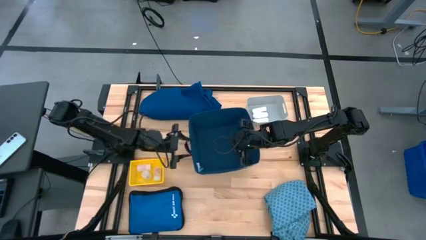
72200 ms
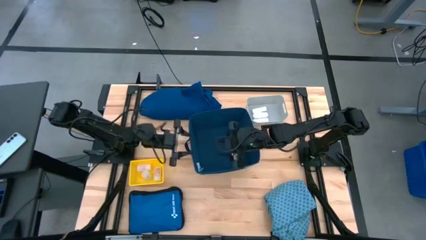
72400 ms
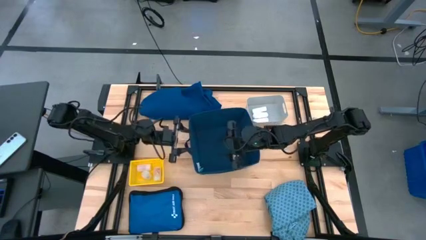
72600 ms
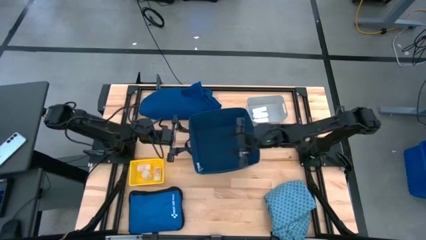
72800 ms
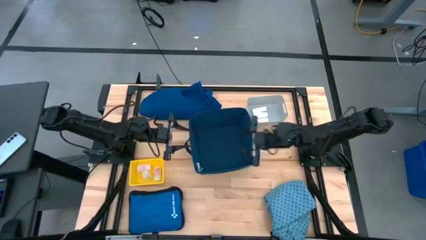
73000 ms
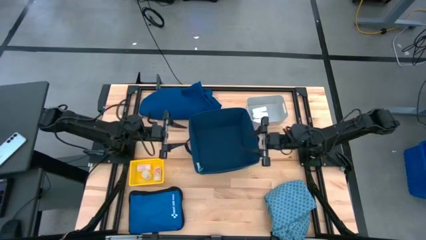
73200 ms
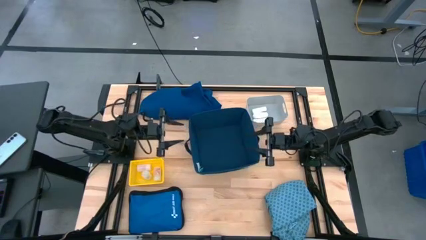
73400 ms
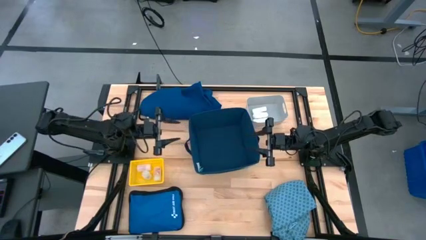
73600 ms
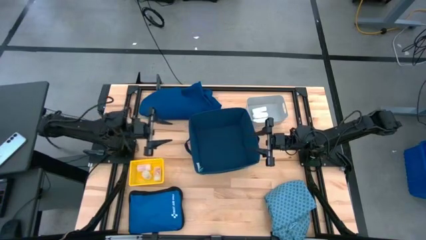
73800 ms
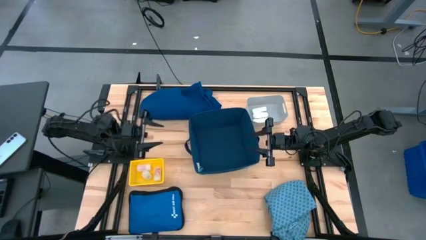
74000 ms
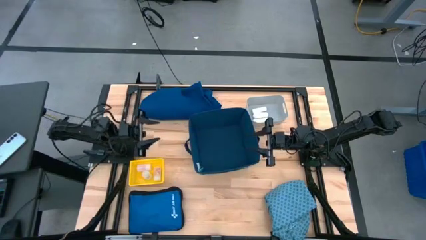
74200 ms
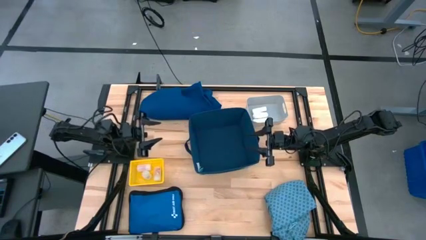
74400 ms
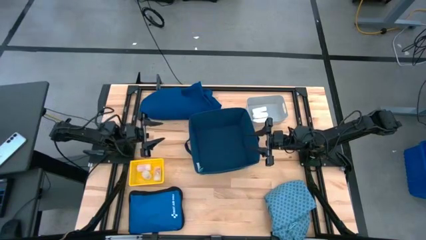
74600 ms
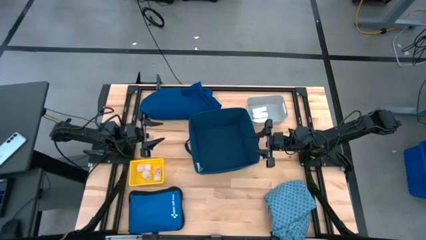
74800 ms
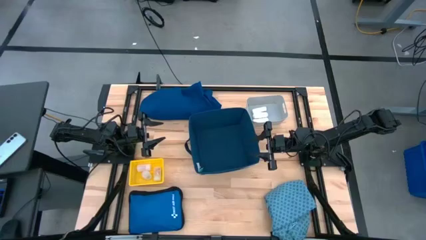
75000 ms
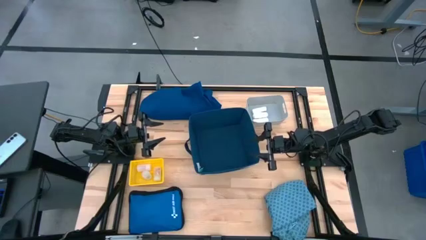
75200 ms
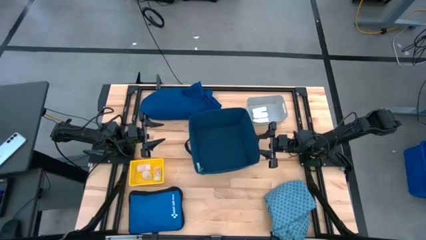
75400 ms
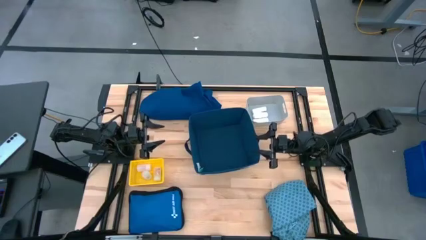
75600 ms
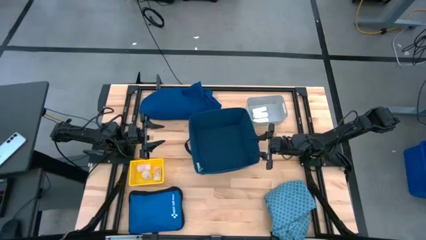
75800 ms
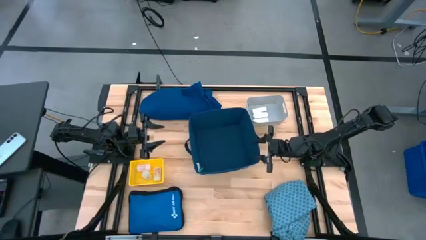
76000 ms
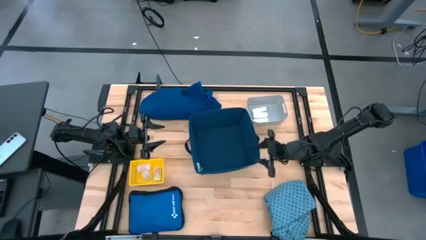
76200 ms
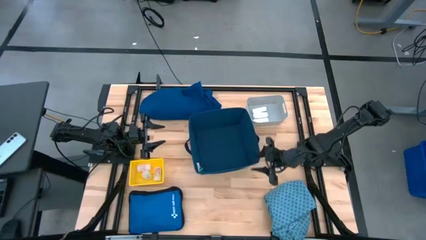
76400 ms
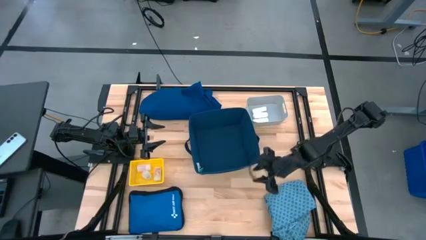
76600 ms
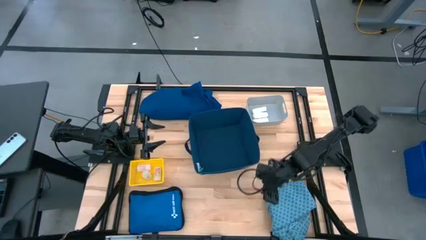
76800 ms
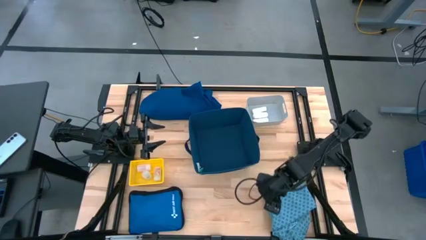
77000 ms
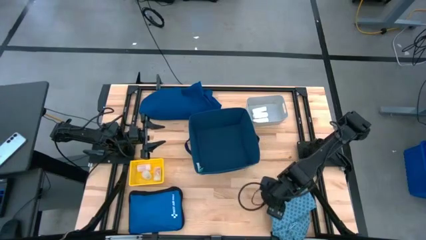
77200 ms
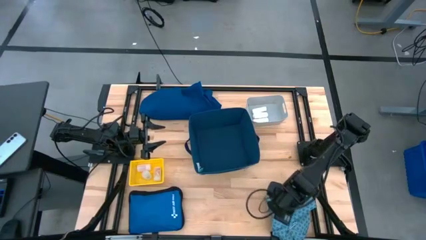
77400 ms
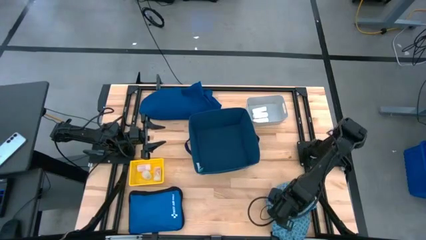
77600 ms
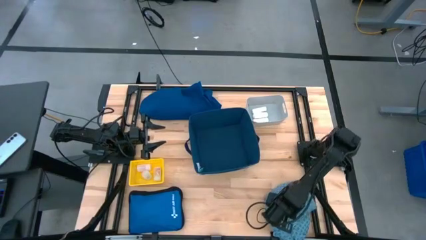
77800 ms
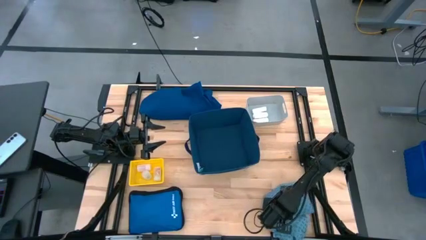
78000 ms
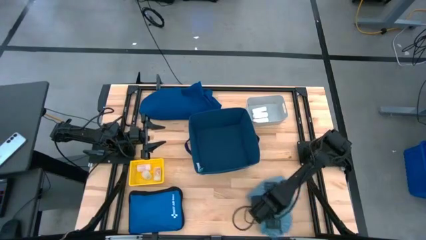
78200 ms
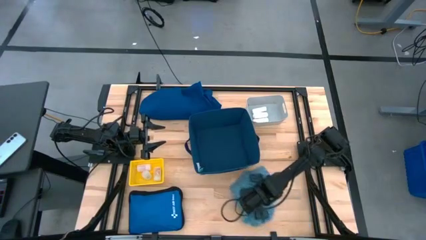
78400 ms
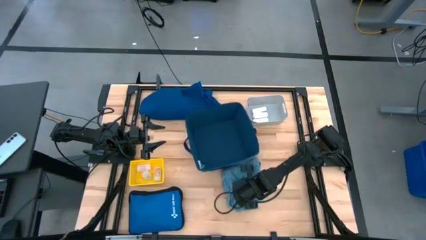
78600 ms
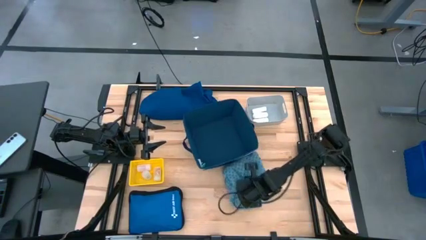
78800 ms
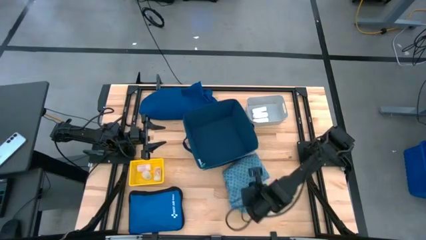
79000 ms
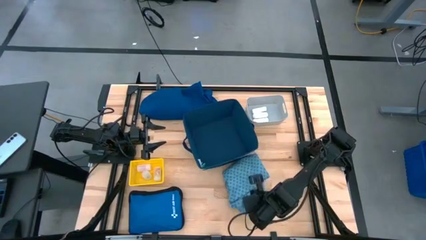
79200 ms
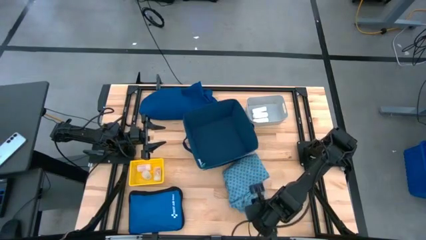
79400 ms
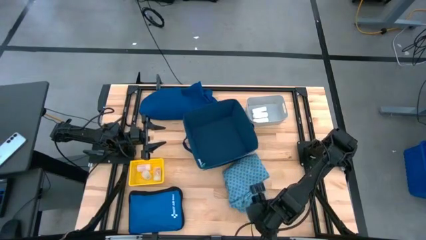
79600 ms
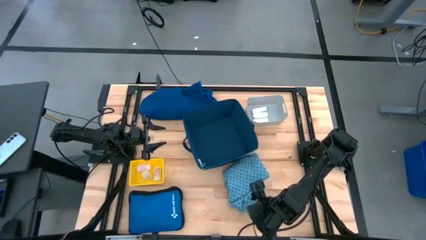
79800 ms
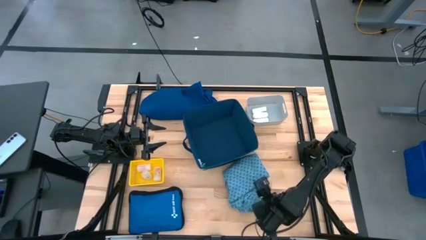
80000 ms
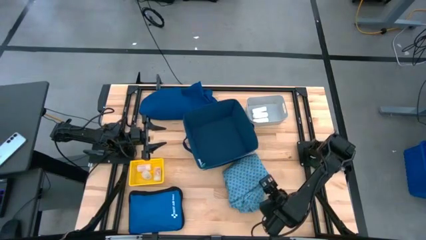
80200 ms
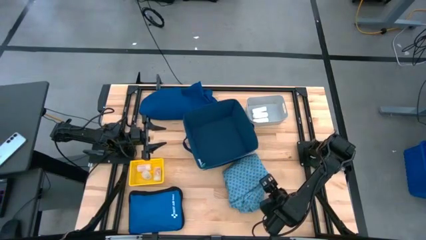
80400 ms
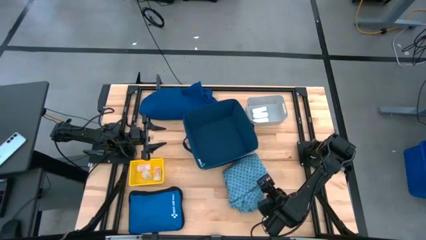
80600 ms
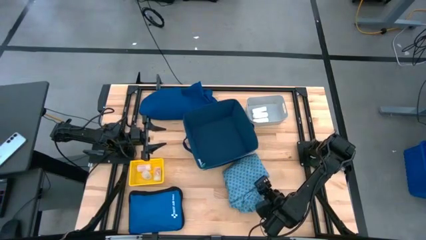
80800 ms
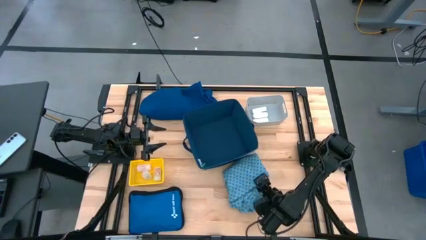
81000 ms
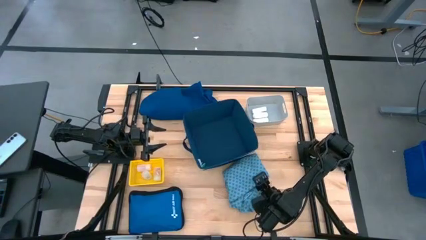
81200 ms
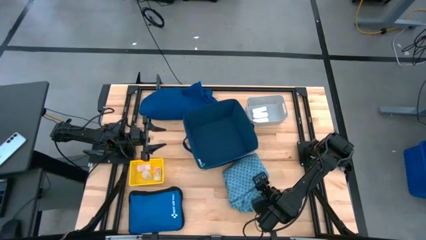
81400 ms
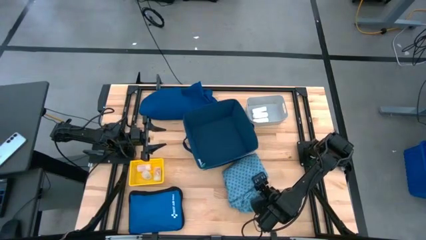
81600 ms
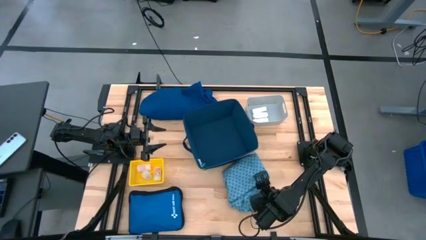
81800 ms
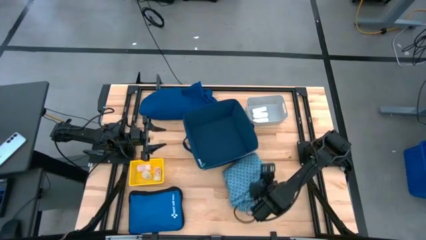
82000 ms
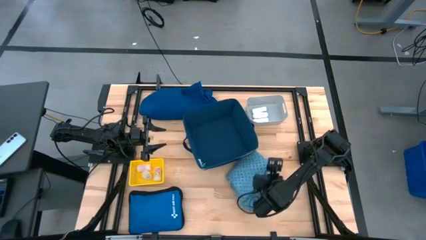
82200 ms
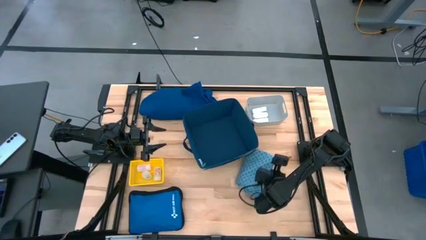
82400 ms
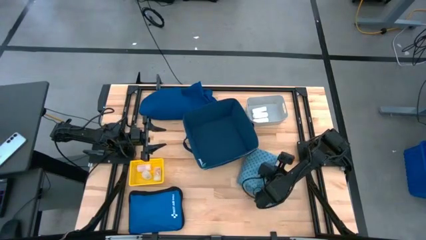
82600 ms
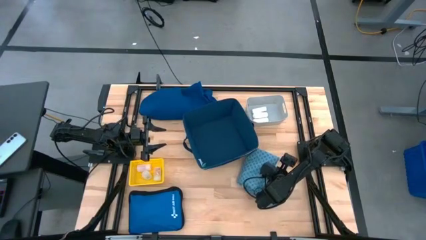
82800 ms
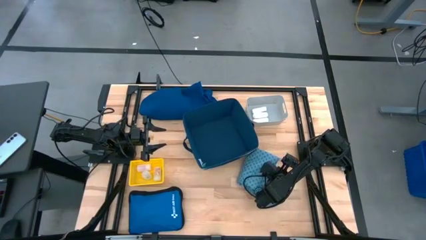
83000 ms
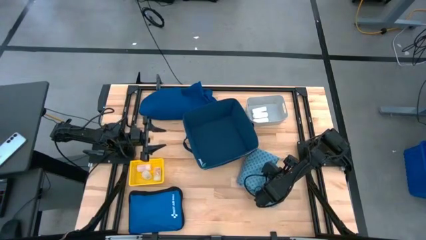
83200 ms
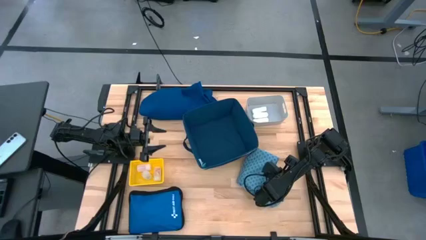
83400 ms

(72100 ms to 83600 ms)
Task: Pick & place medical supplies in basket/bin
Put the light blue patient gown into the blue bin

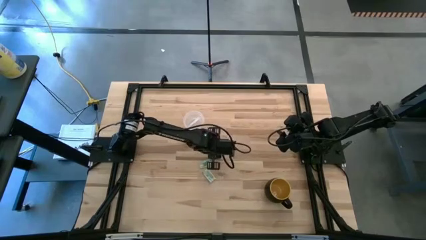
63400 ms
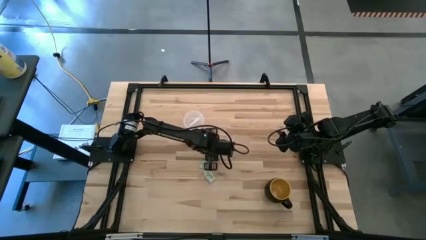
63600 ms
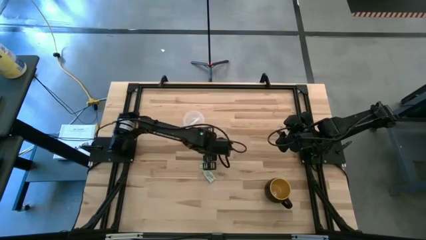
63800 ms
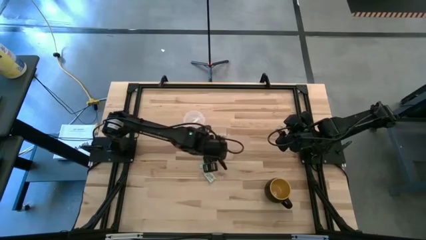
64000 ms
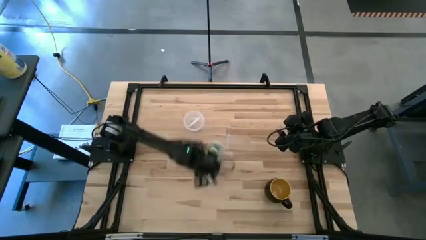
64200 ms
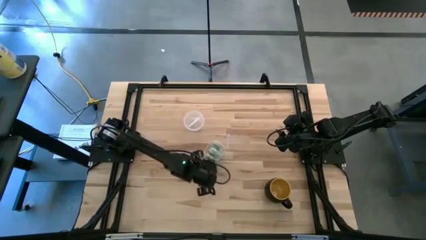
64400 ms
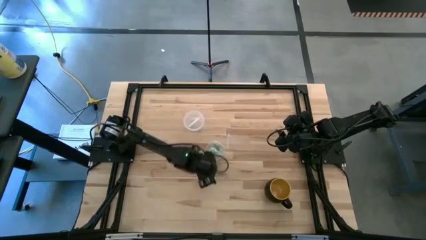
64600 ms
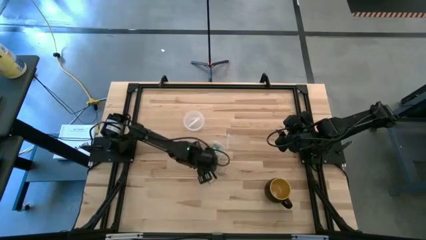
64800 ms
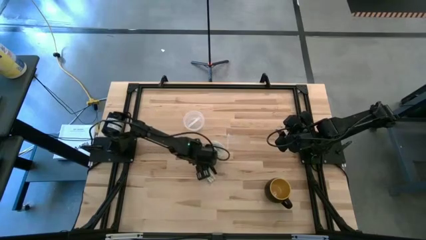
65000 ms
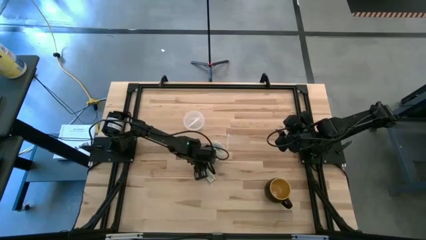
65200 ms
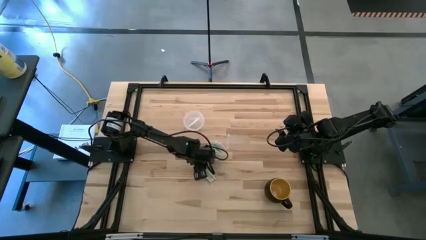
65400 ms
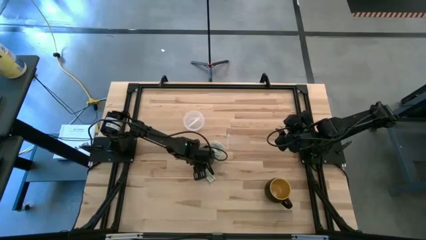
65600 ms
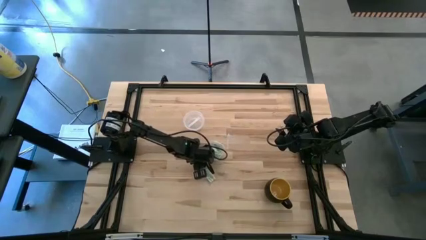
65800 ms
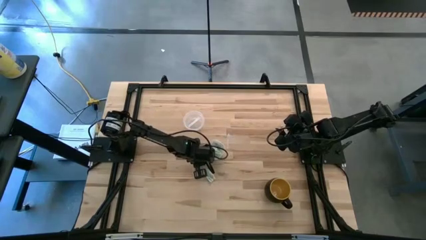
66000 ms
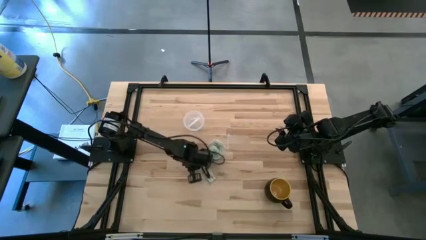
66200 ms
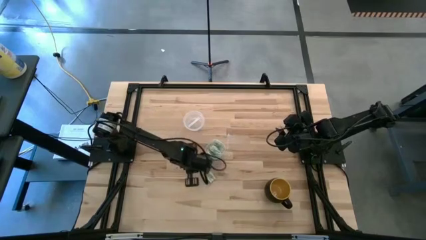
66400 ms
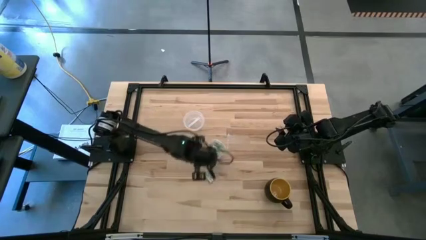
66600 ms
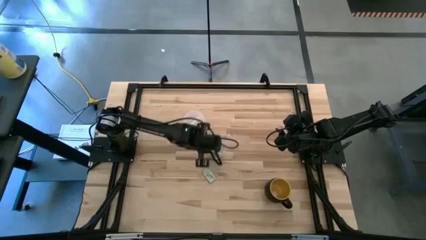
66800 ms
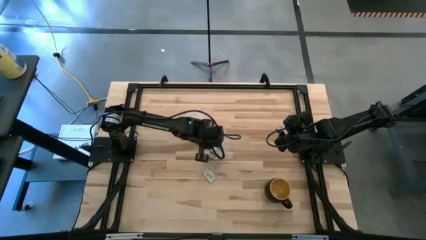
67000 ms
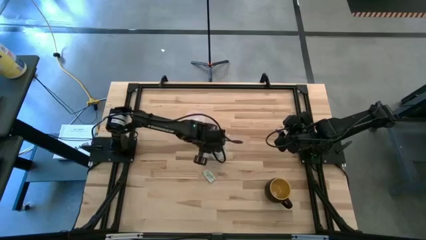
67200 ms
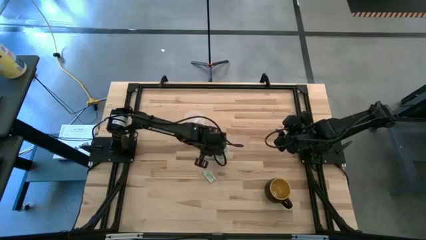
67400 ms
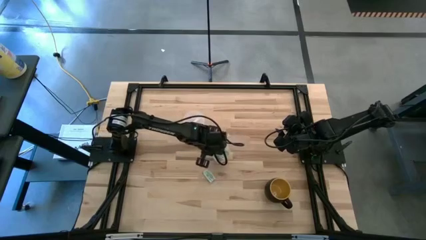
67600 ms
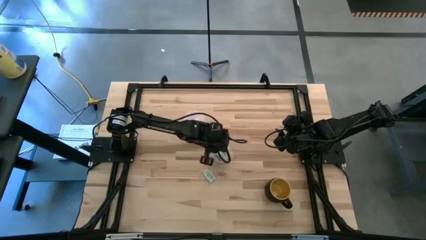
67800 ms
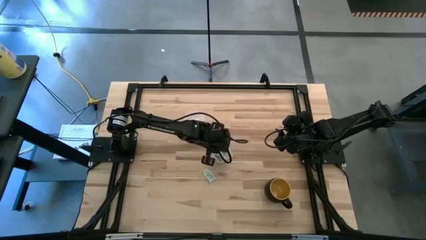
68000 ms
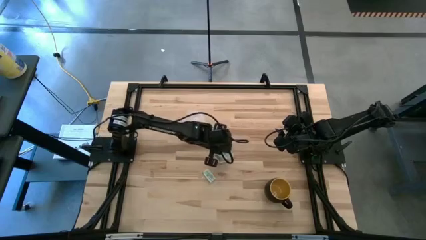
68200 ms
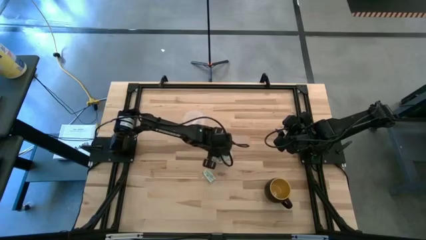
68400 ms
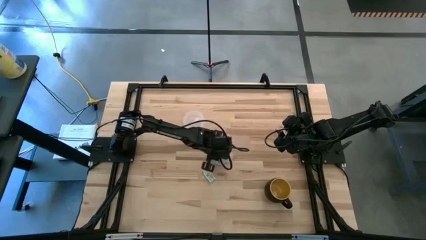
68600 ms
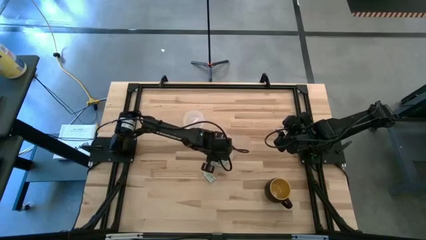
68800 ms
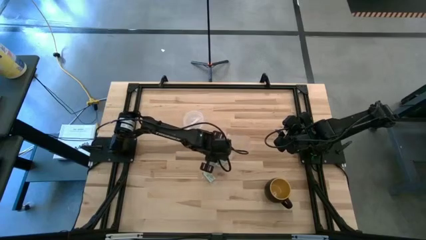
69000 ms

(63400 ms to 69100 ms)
Task: Pick and place items into bin
Put the top light green stevia packet into the transparent bin
